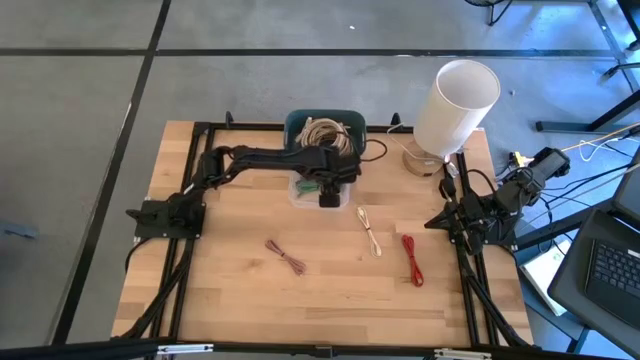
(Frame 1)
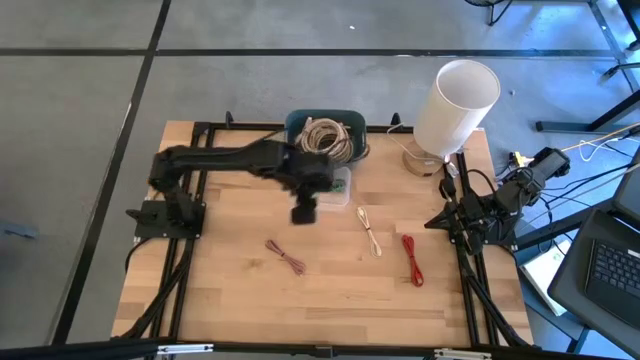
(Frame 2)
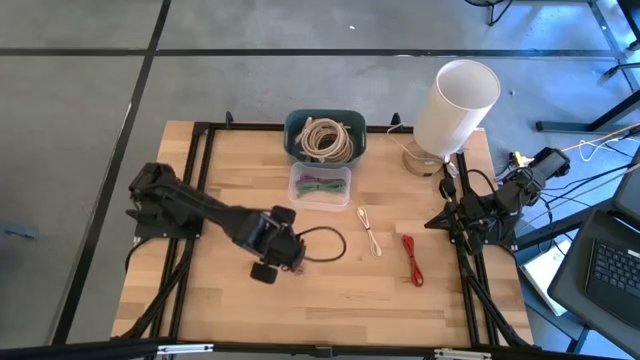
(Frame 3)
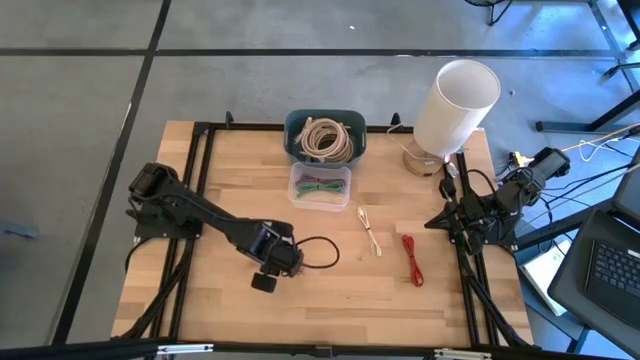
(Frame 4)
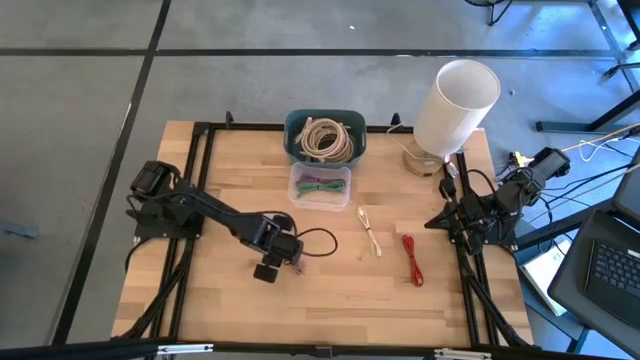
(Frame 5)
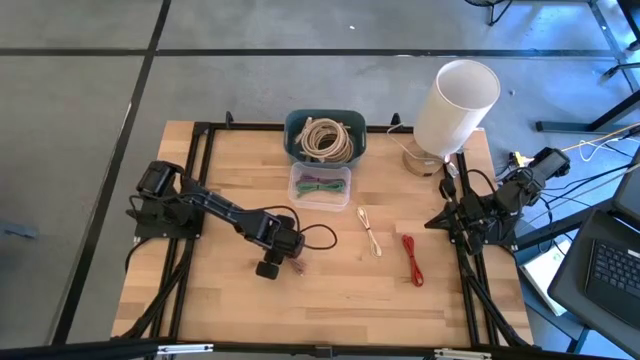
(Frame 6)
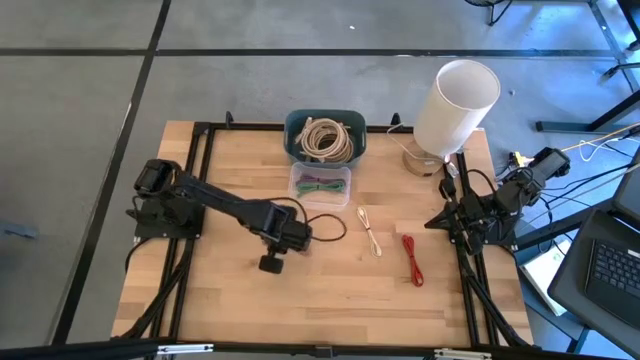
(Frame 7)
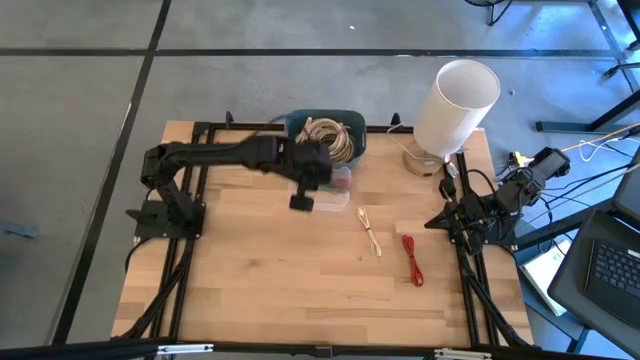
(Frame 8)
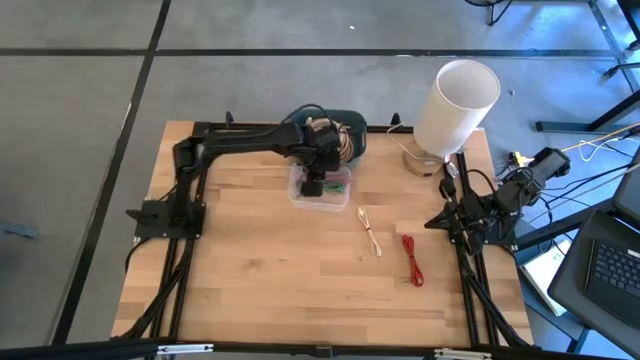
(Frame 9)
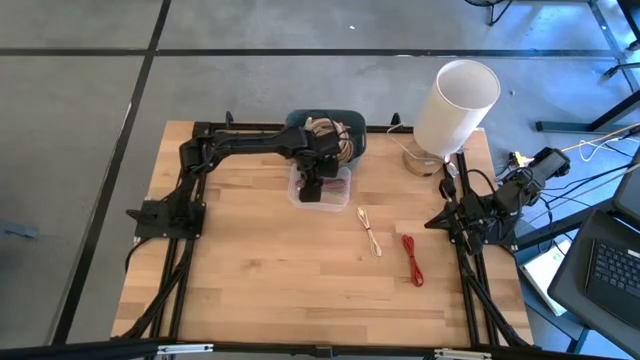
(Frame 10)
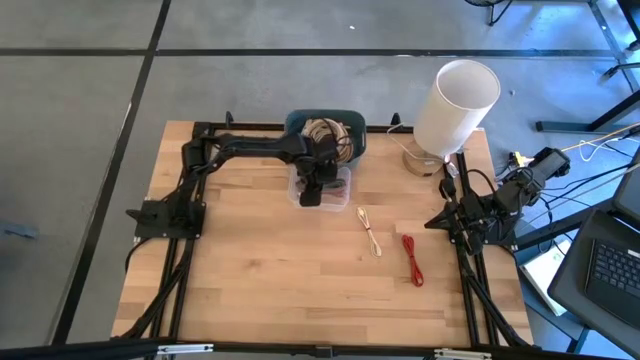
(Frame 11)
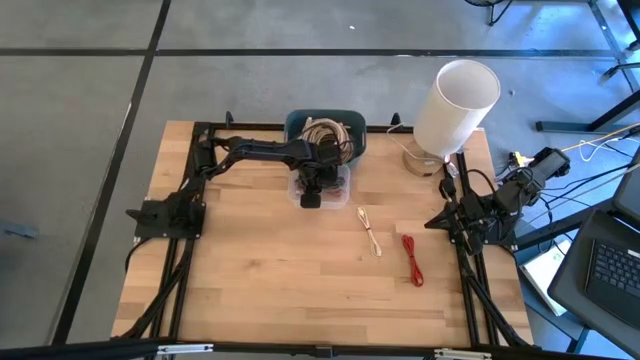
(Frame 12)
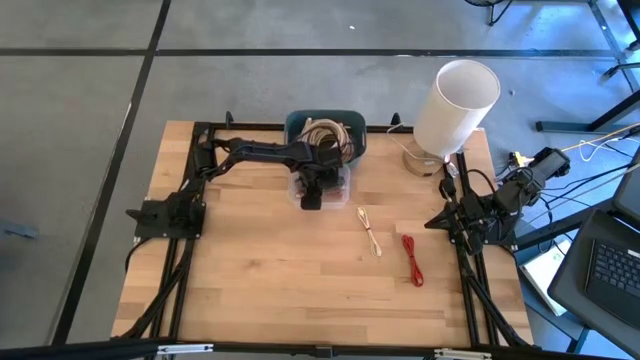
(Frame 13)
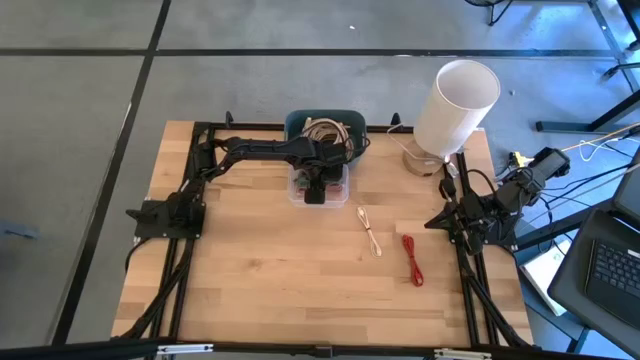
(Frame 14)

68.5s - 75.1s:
Put the pink charger cable into the transparent bin

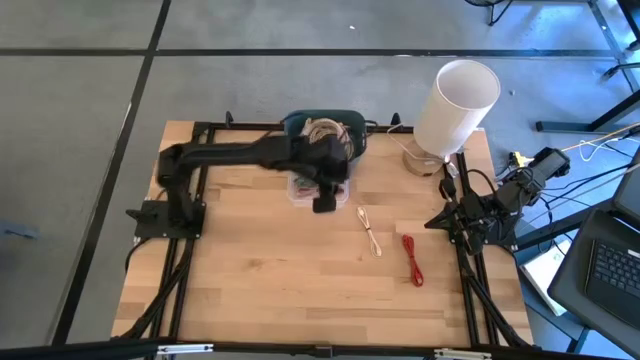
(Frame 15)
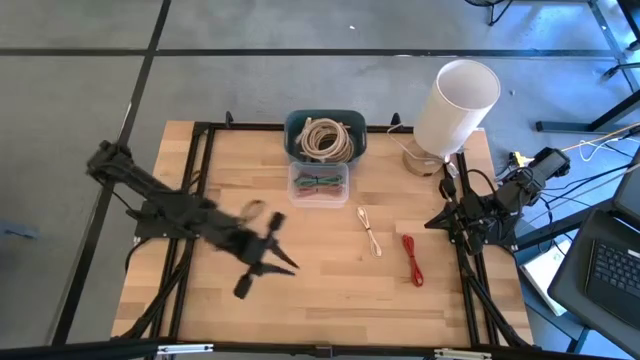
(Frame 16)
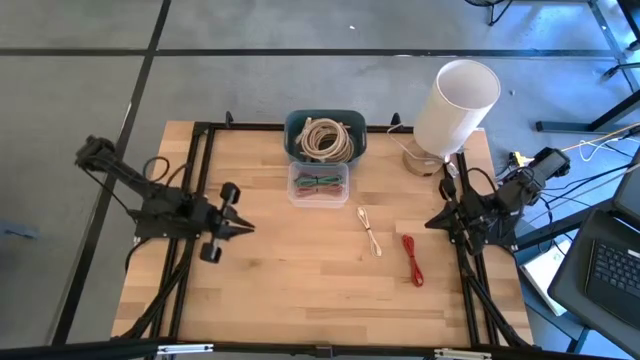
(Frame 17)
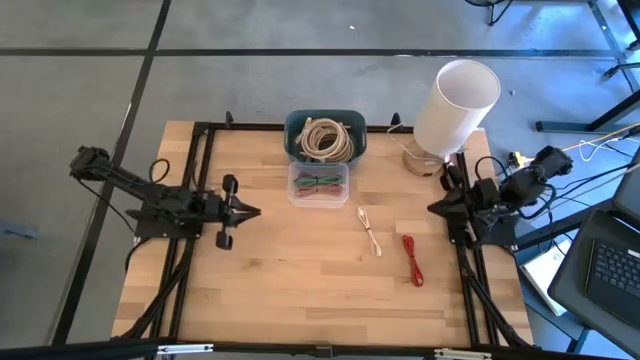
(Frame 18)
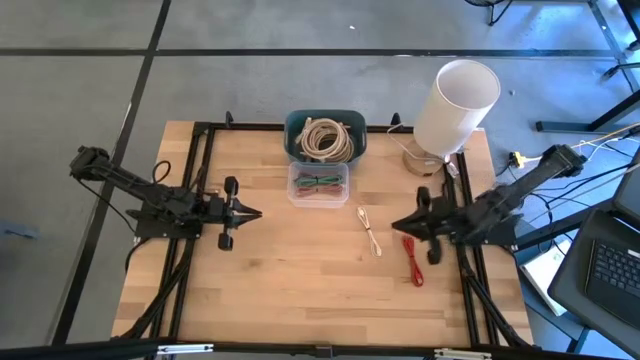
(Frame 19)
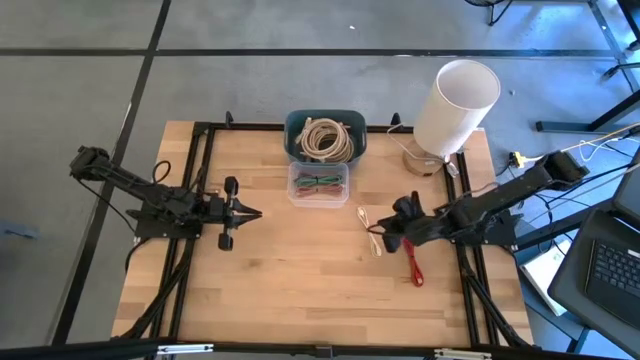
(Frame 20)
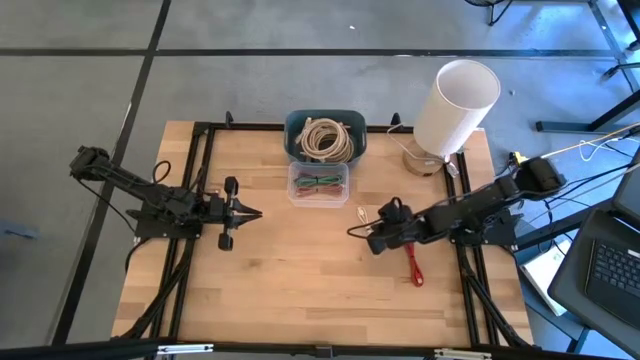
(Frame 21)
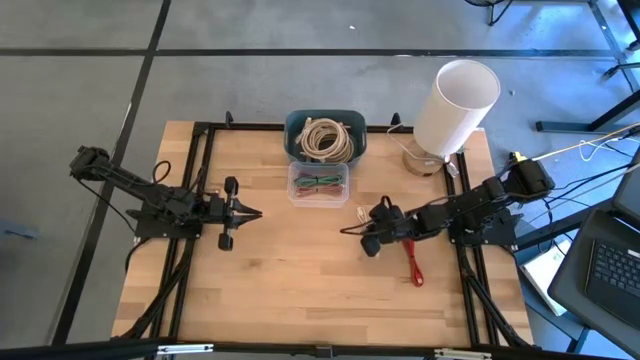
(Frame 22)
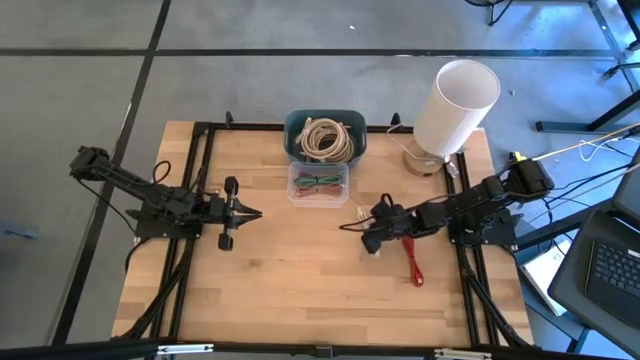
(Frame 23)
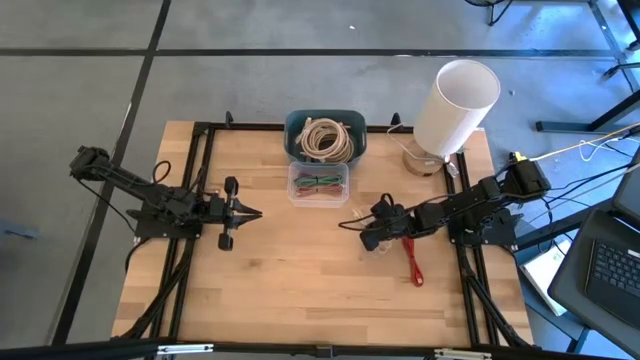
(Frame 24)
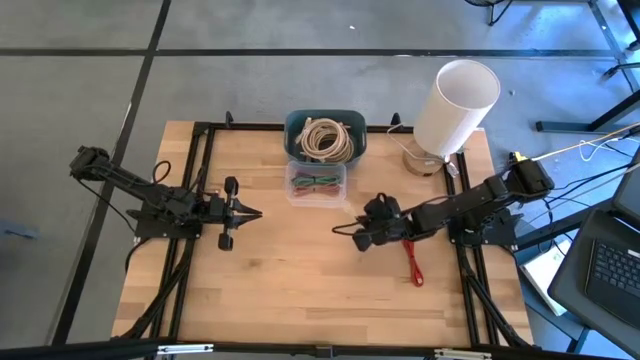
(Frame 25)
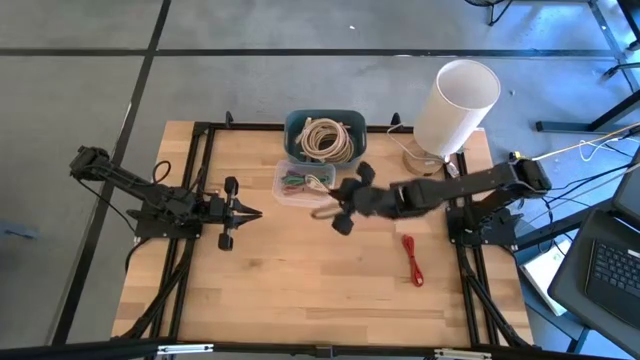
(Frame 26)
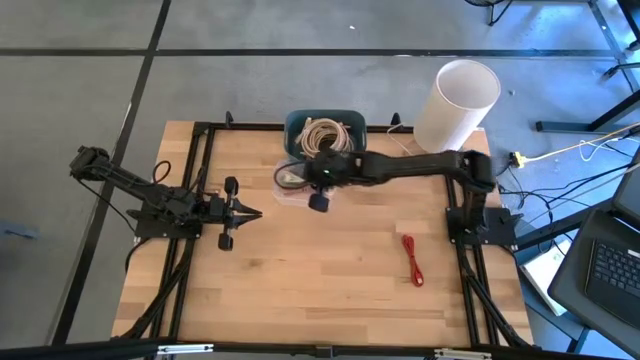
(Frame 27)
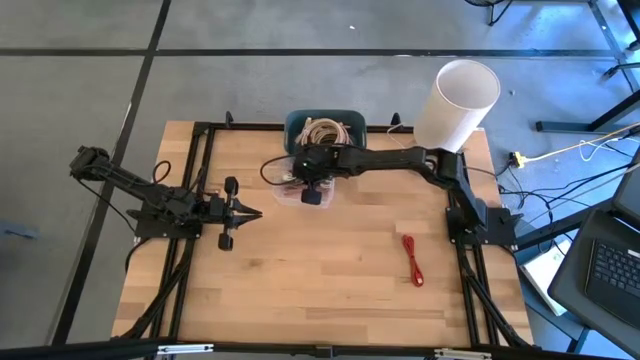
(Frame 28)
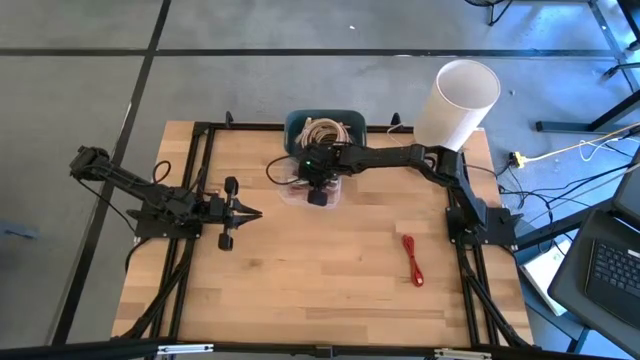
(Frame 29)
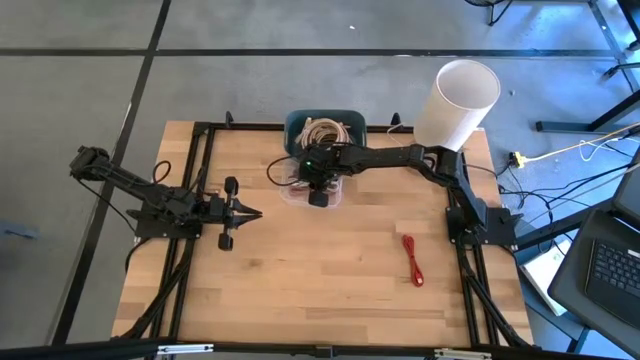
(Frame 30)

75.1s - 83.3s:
Put the white charger cable into the transparent bin

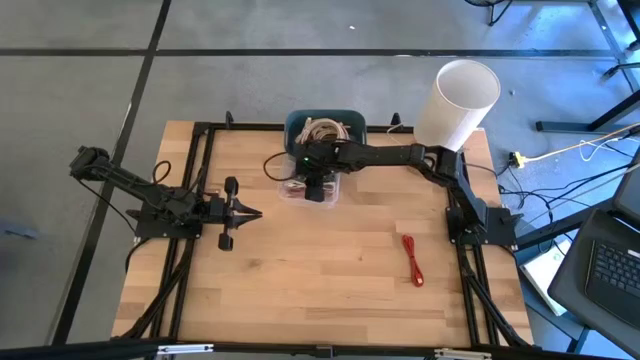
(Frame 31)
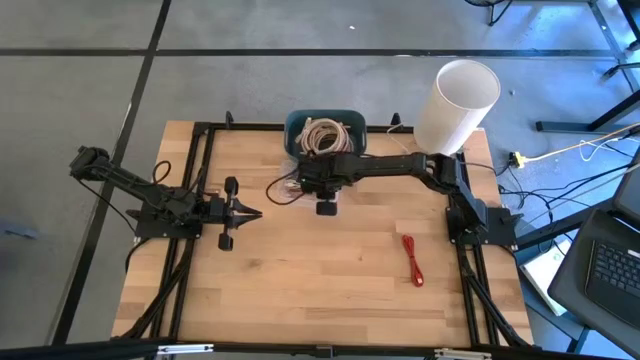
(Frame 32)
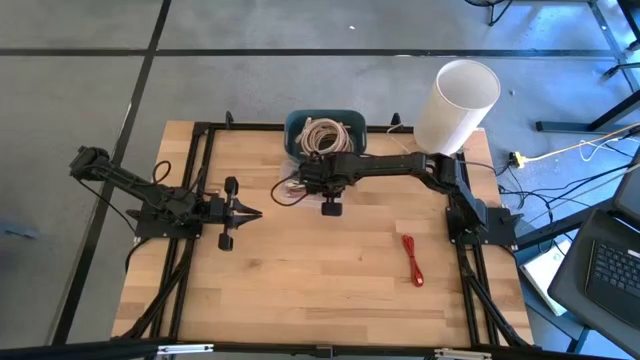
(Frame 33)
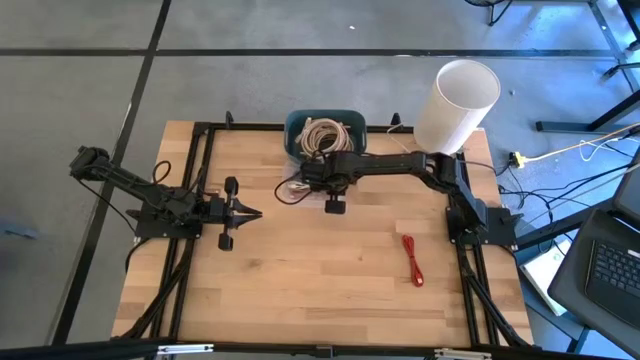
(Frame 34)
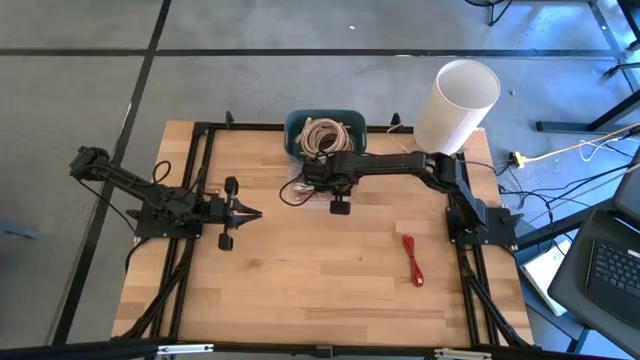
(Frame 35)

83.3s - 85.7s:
Adjust the transparent bin
